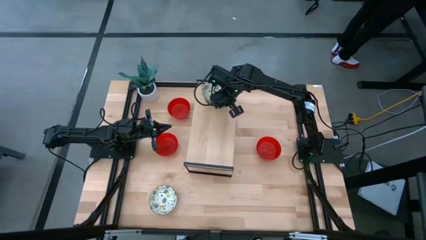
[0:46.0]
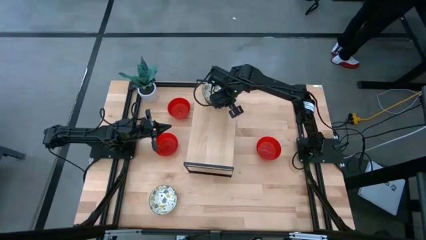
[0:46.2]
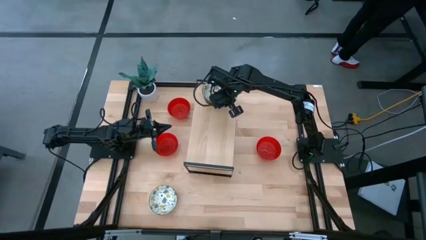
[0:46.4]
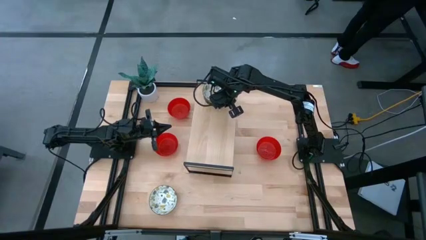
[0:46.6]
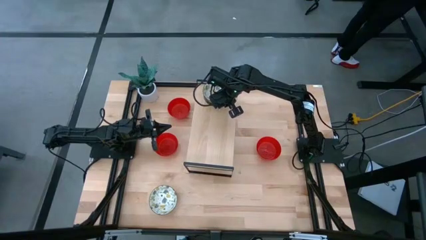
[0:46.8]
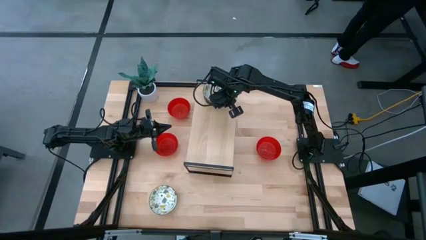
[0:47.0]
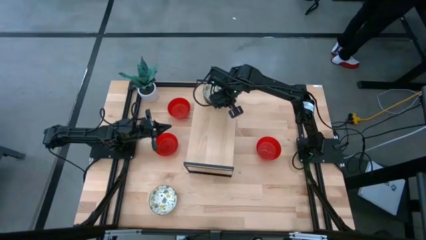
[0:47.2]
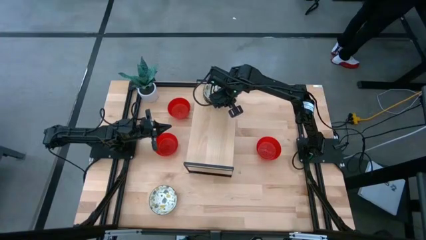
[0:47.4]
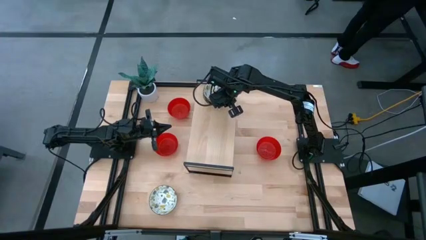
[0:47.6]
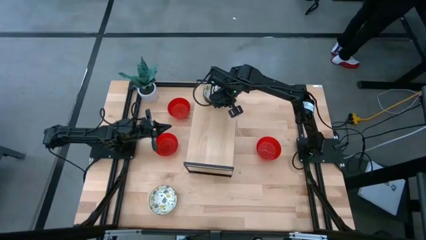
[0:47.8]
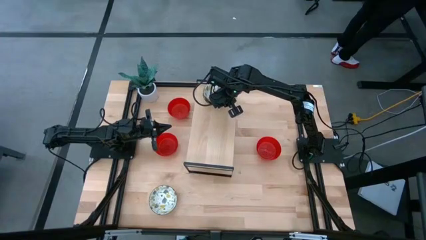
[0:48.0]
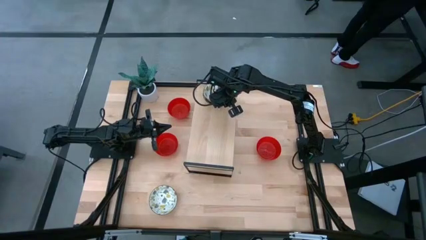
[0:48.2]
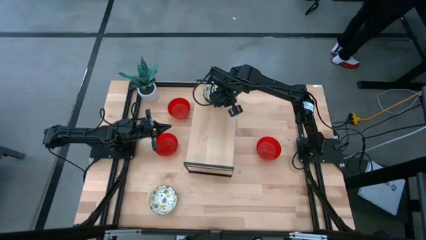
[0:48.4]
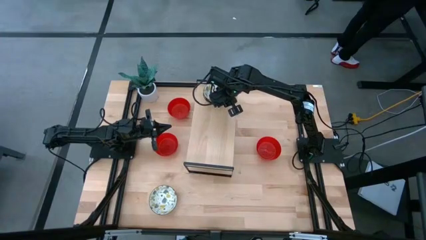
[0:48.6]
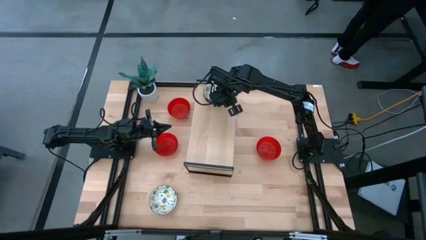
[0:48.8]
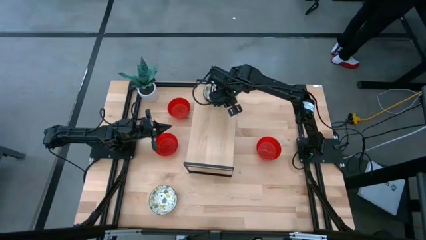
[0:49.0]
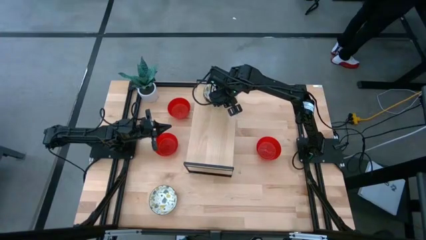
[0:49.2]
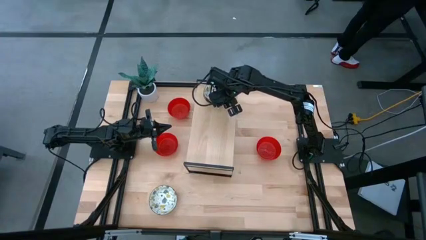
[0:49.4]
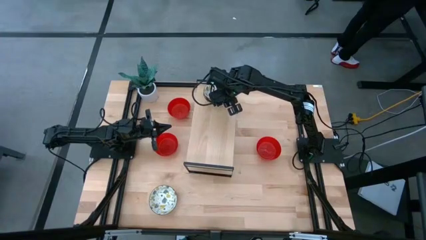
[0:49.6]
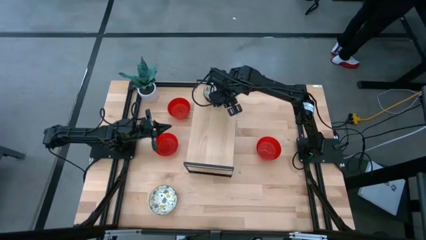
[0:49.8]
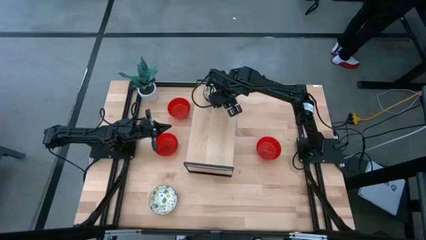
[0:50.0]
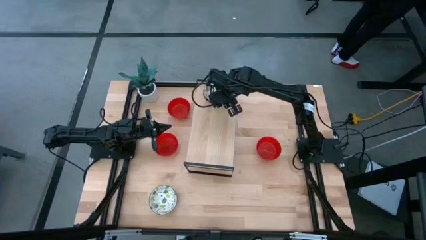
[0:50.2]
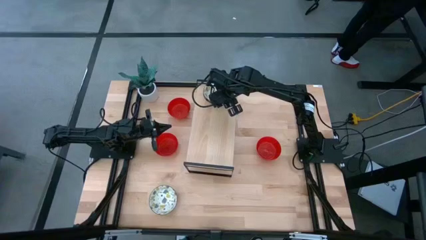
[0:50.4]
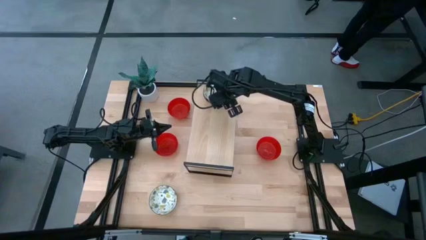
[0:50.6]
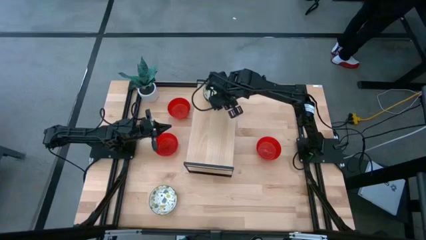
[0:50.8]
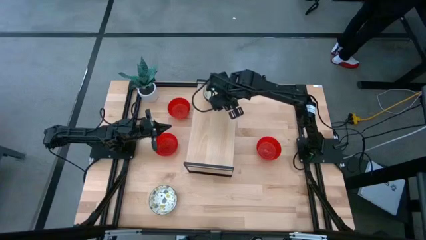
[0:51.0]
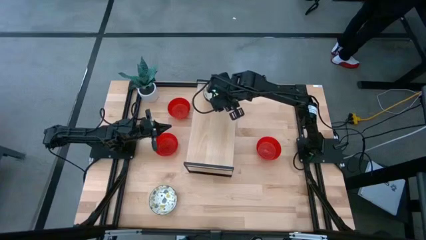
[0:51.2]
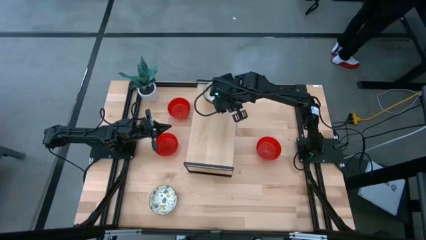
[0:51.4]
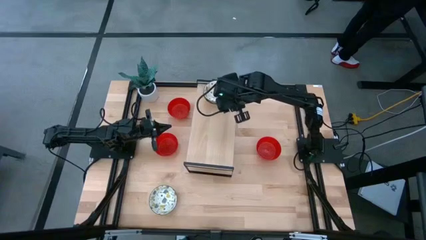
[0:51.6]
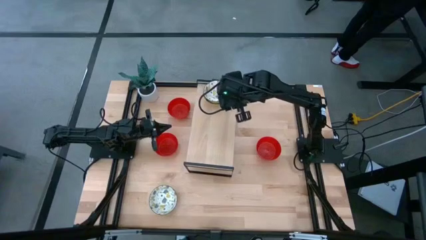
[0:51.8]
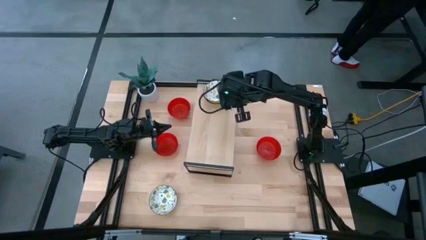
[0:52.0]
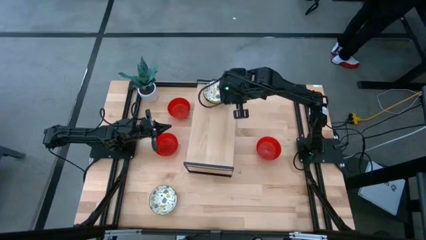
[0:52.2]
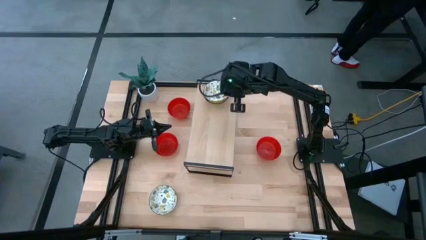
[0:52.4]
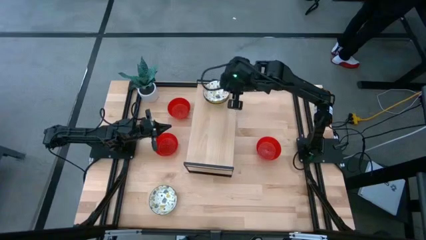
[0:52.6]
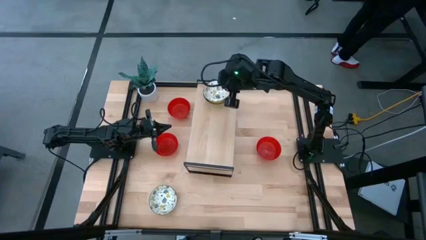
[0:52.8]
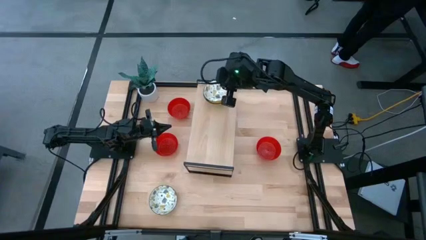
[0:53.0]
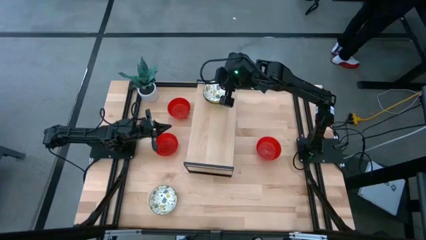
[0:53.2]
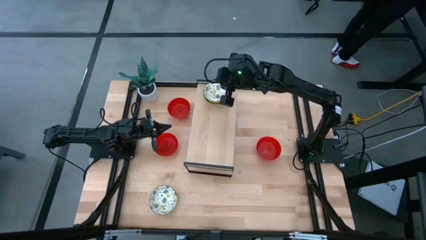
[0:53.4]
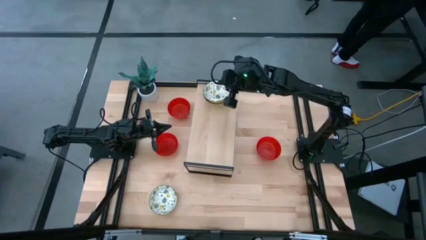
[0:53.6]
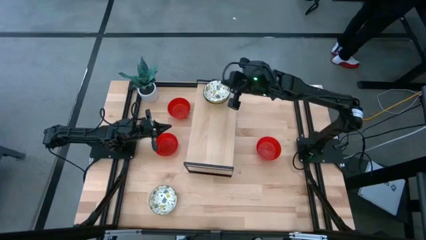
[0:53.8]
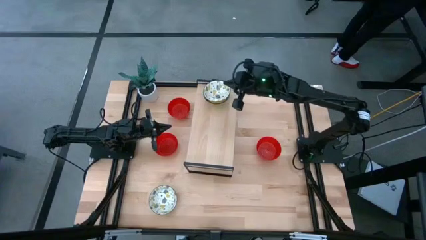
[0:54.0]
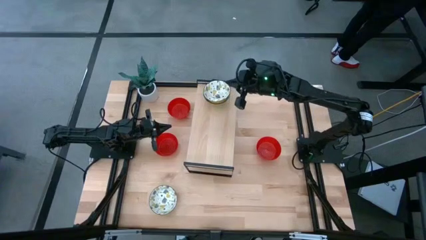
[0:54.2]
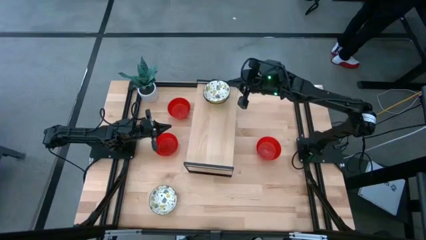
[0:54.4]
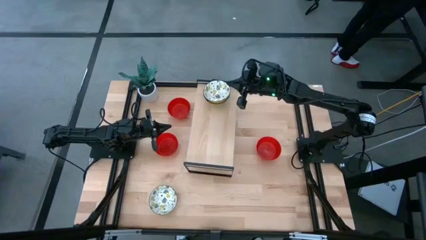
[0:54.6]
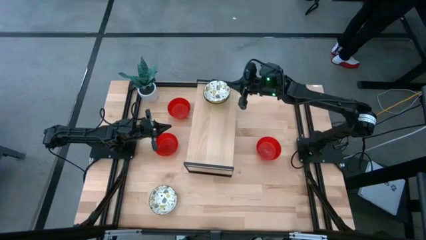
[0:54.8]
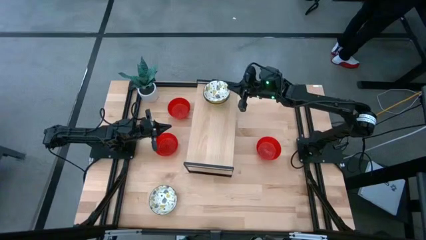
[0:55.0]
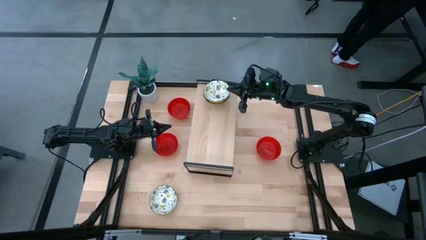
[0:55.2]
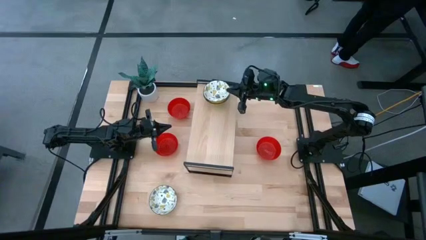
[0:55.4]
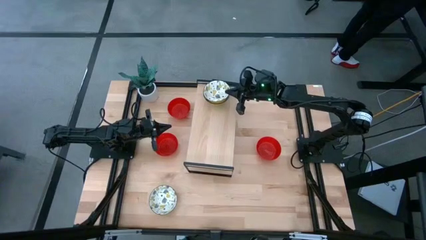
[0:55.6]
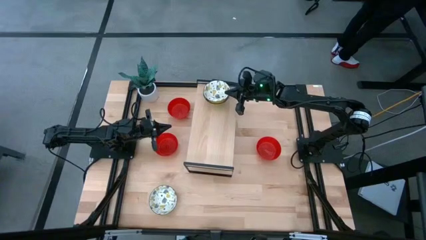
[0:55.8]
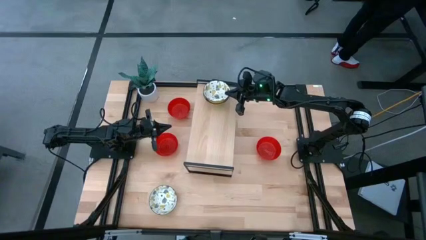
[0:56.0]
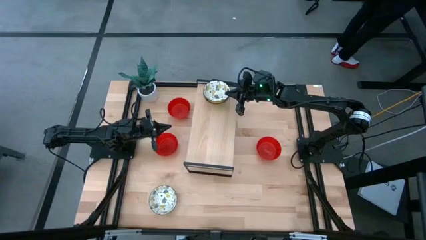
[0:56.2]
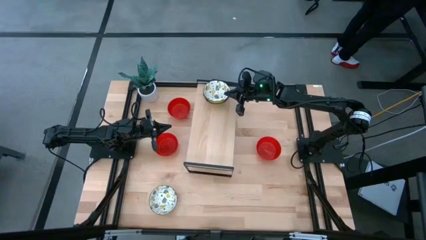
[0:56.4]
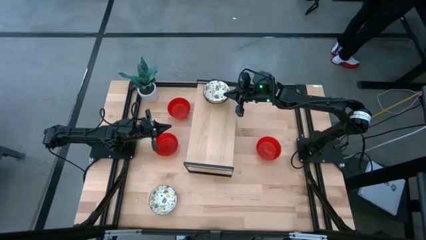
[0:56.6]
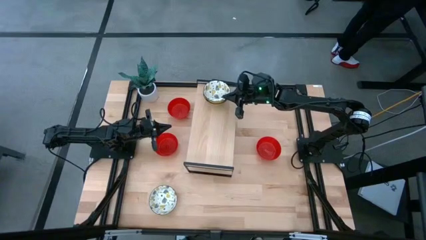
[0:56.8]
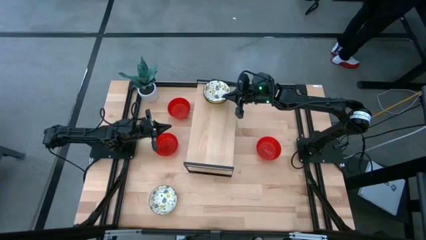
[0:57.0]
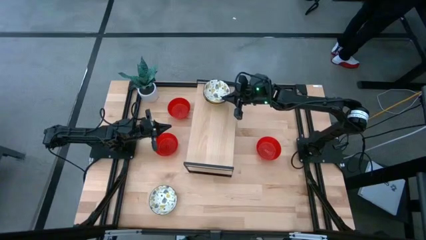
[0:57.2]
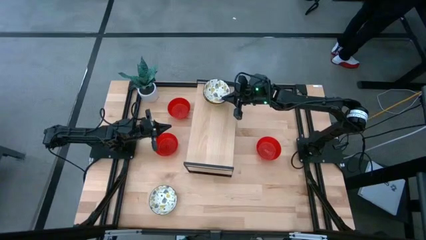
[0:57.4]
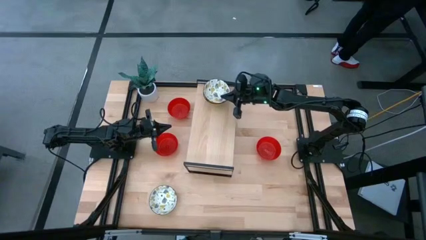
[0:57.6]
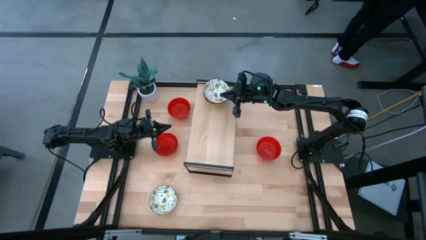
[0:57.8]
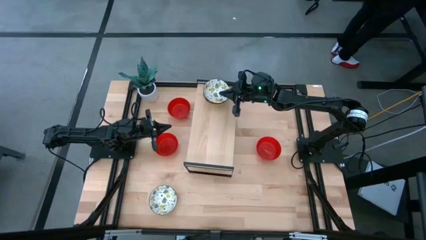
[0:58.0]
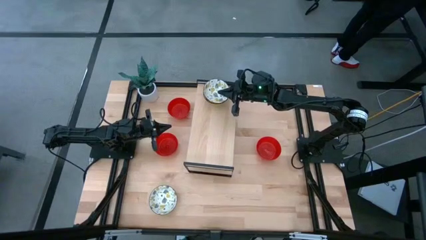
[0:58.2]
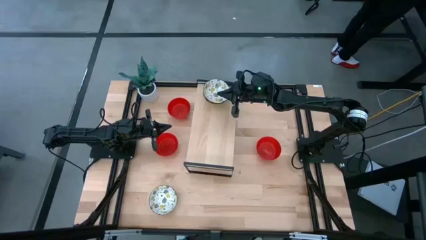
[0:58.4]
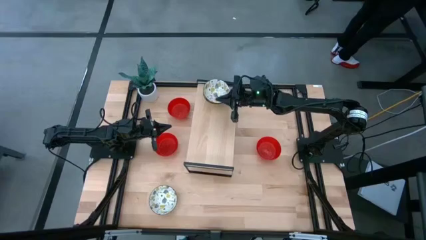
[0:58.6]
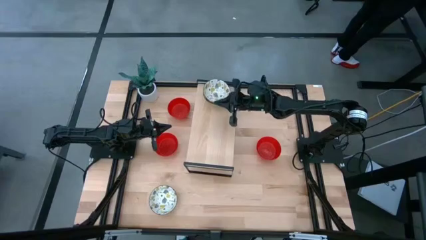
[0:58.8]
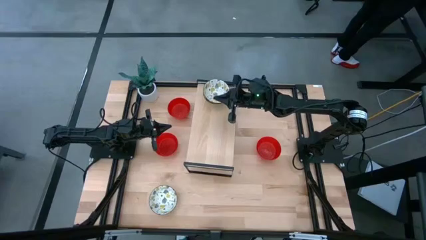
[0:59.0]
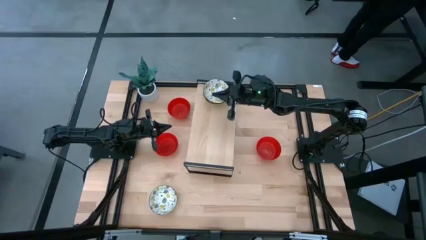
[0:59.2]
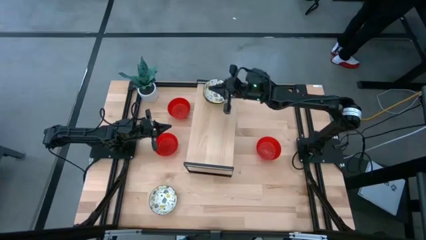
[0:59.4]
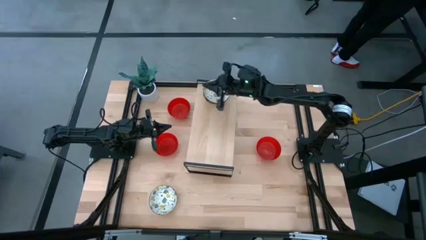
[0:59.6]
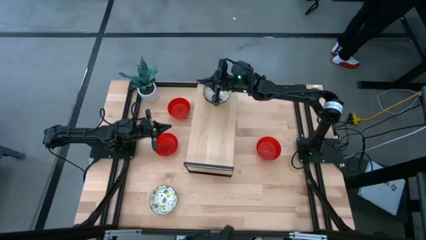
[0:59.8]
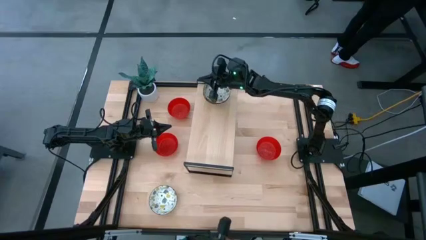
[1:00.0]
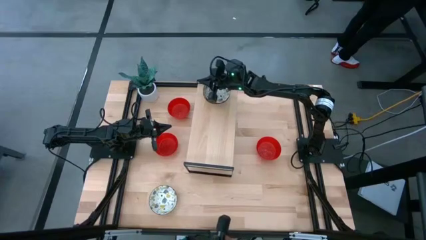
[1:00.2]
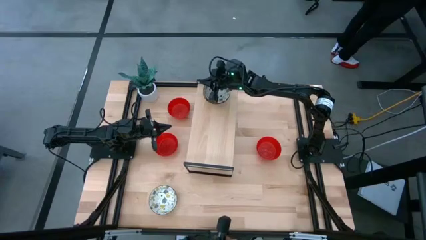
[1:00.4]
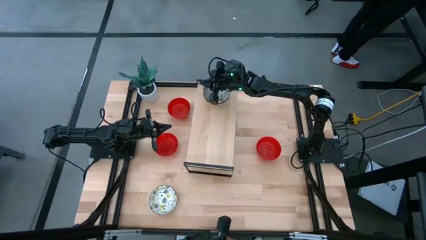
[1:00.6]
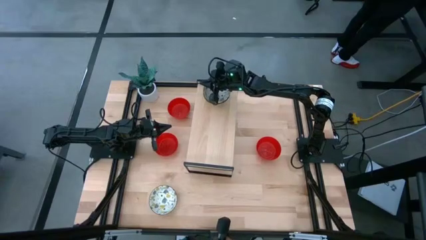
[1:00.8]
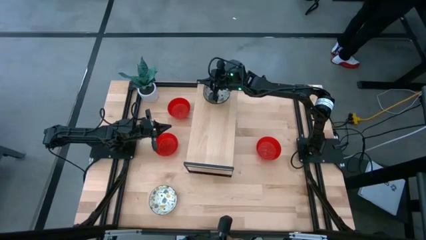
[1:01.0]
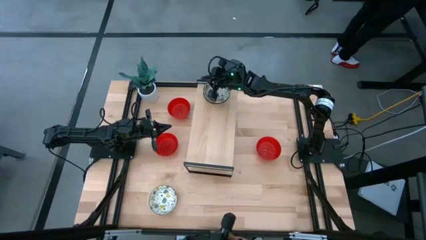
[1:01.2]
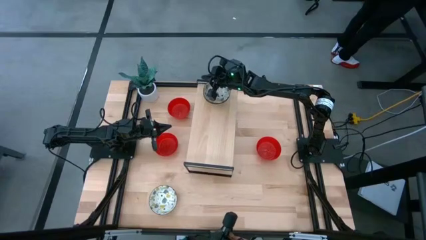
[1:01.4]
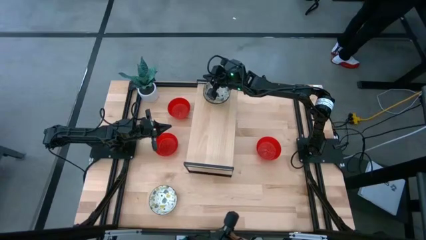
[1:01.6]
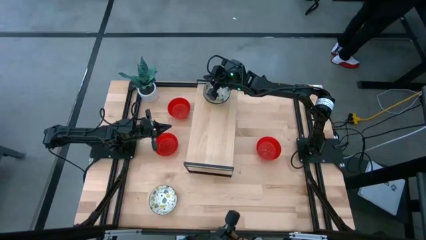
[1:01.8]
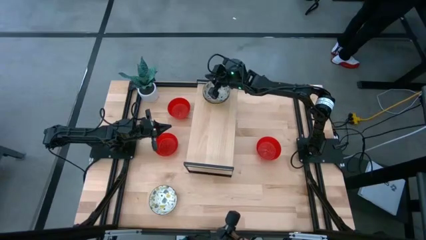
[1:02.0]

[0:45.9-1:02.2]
Task: Pick & Place Mini bowls
Stack the right white patterned bowl on top of the white patterned bowl on the shelf
